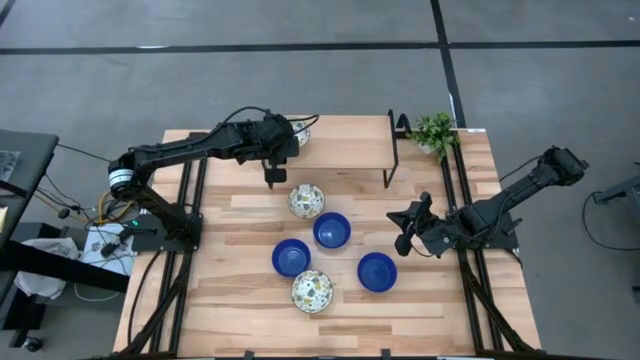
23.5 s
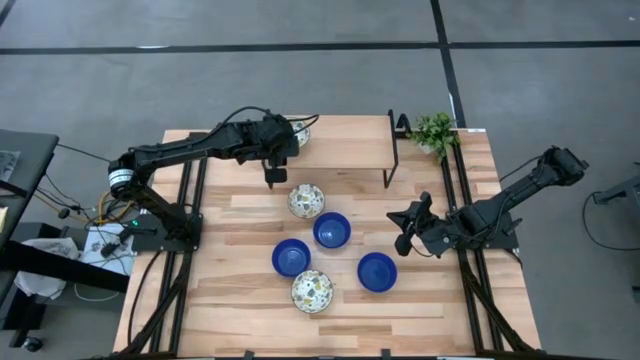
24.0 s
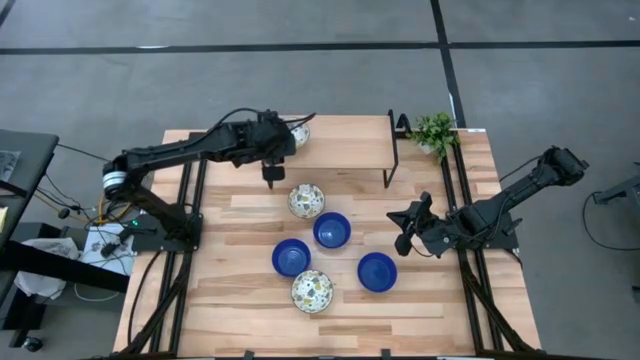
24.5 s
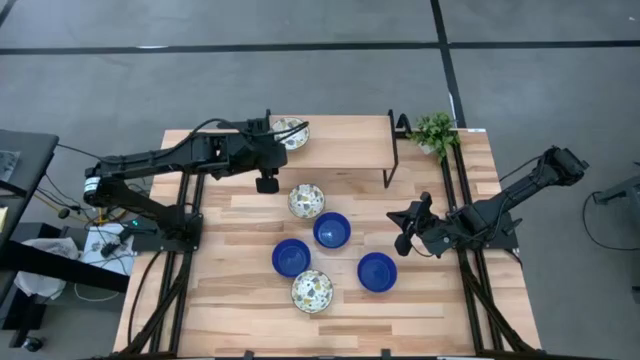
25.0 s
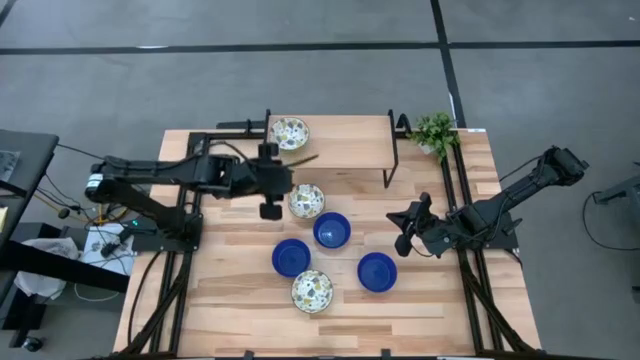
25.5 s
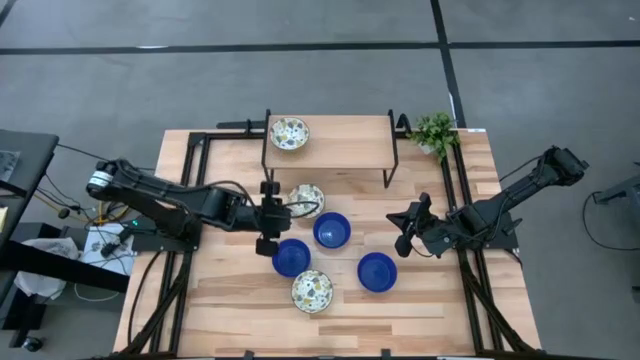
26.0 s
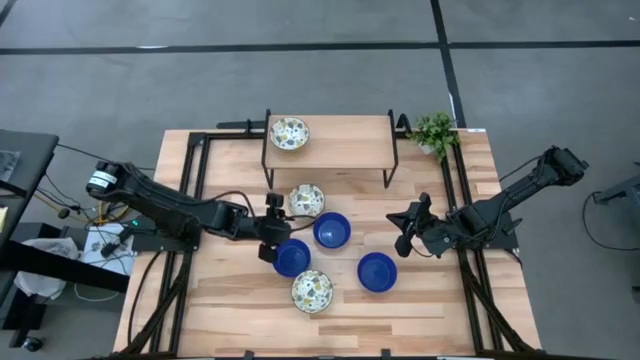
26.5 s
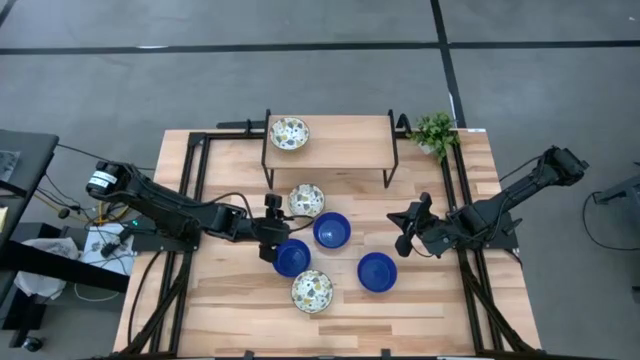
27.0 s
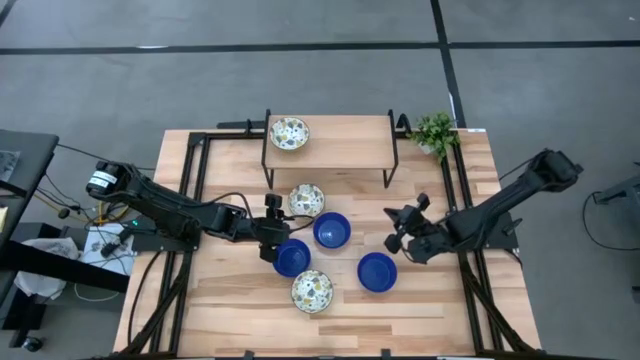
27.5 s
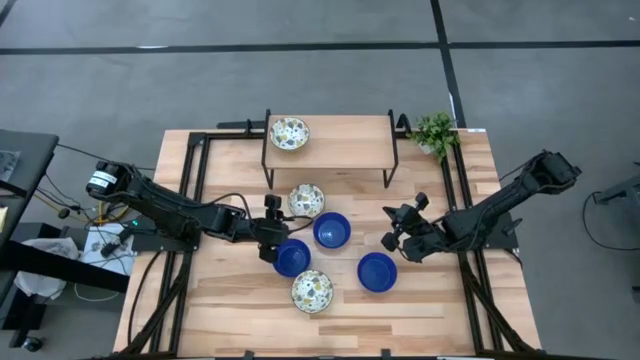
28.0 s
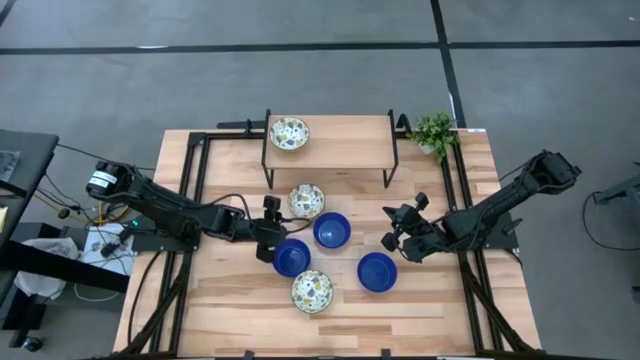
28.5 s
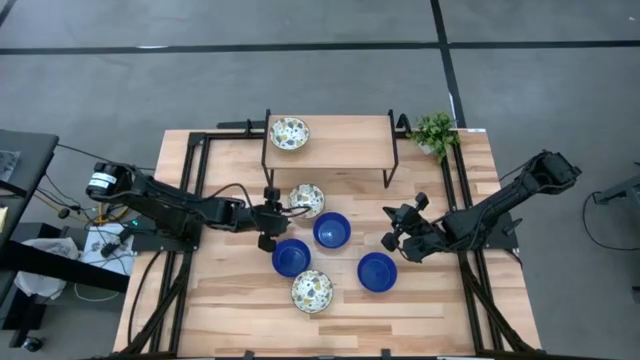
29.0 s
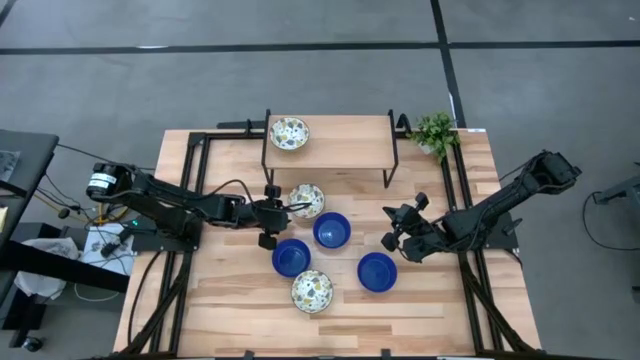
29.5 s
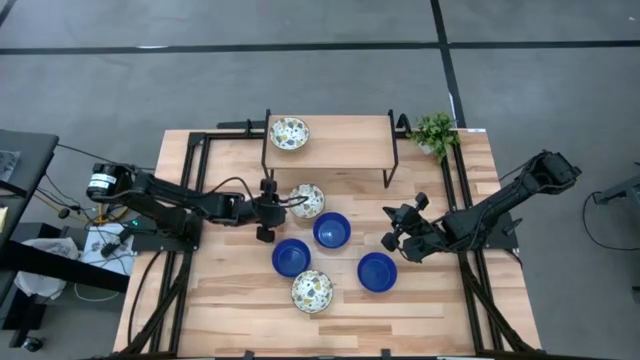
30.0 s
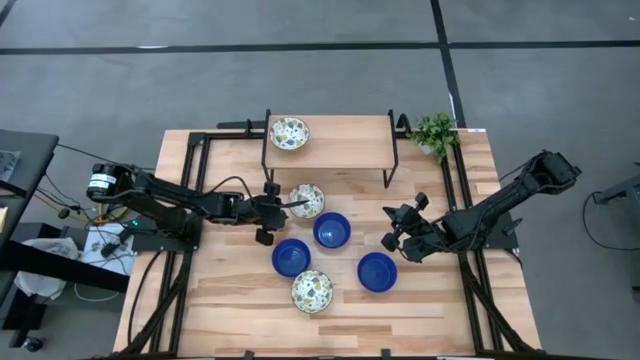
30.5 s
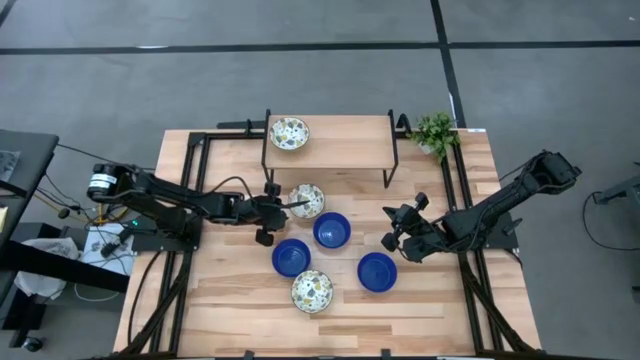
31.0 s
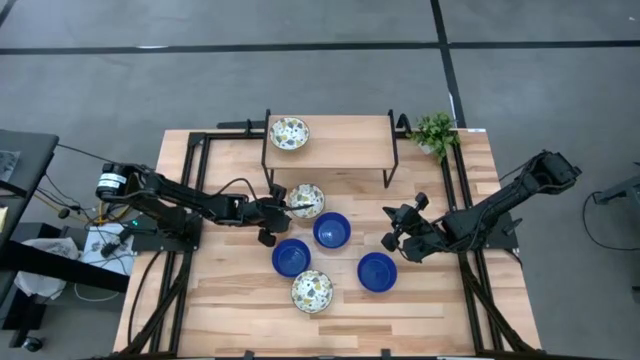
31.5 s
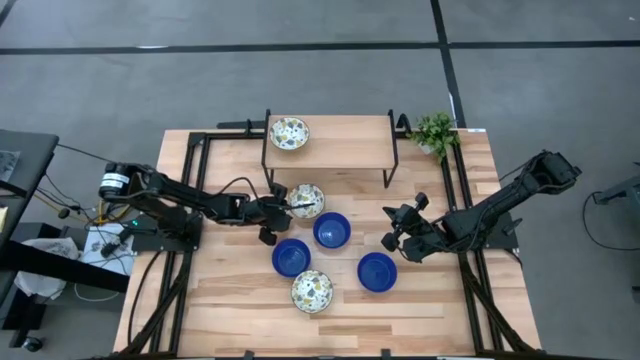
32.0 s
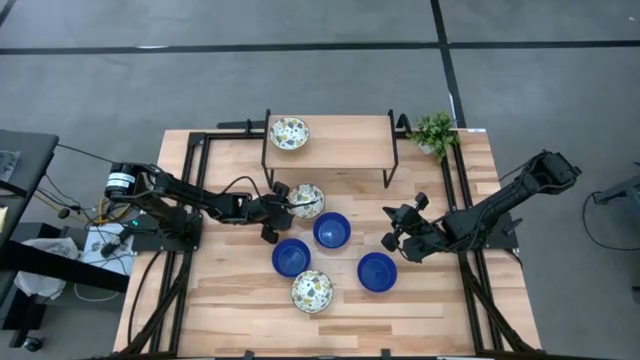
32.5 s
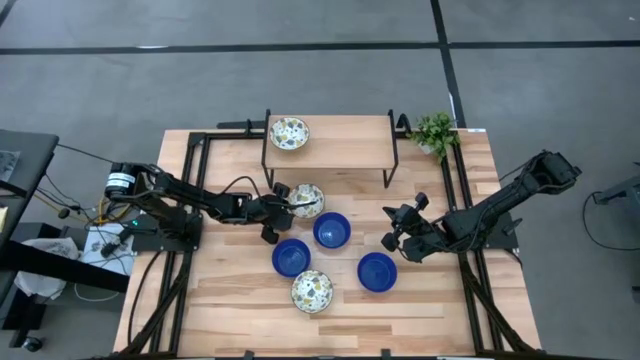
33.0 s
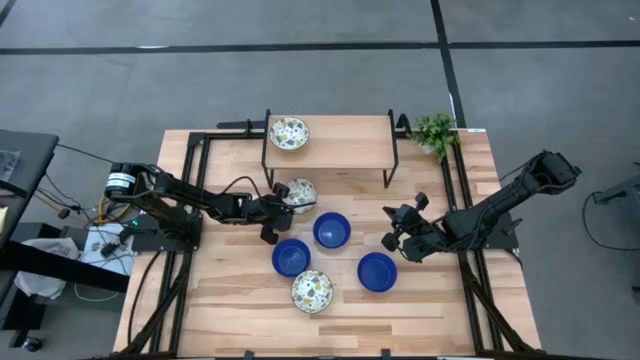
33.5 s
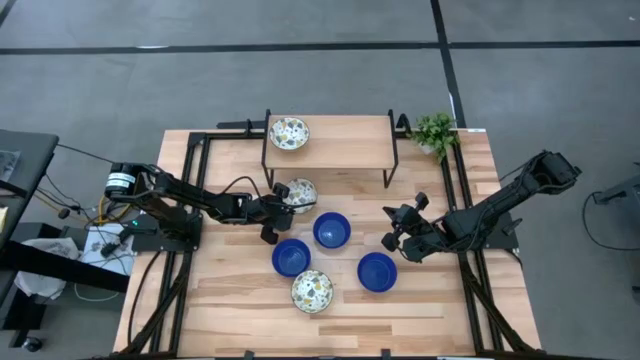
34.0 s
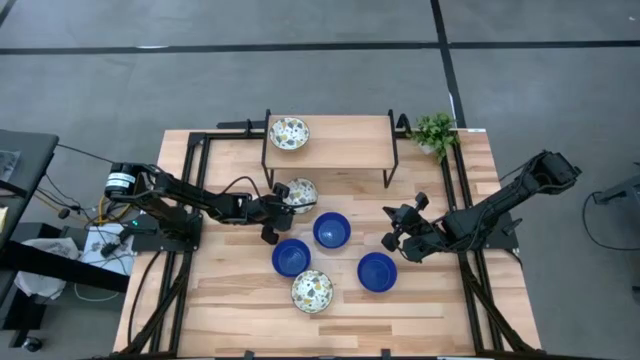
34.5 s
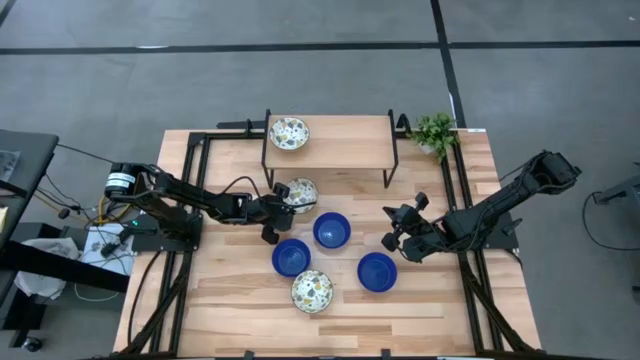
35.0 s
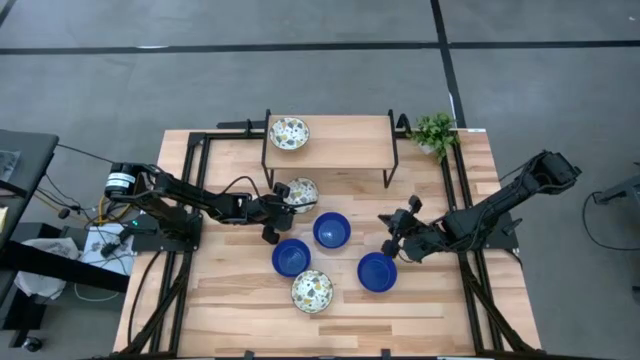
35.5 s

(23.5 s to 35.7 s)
Task: Pick & Place Mini bowls
Stack the white pattern bowl on the top of the white pattern bowl on the shelf

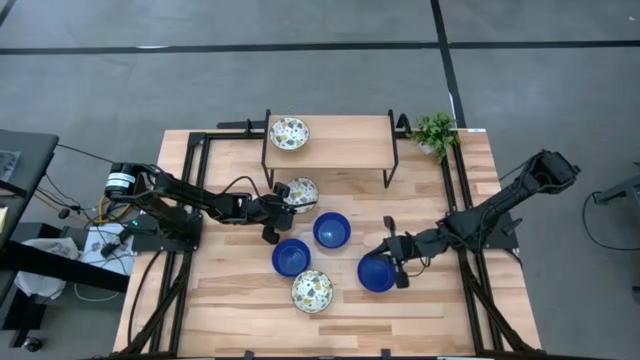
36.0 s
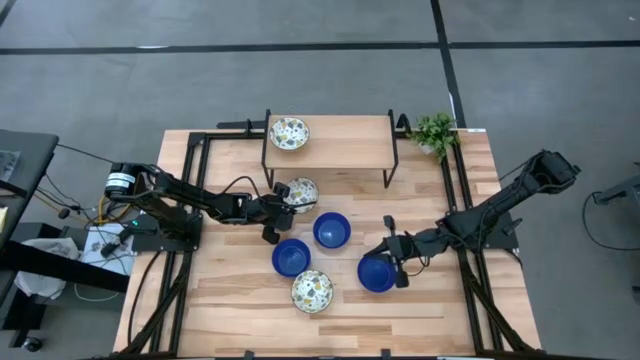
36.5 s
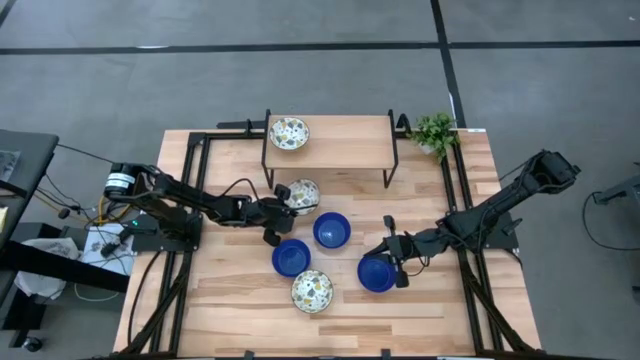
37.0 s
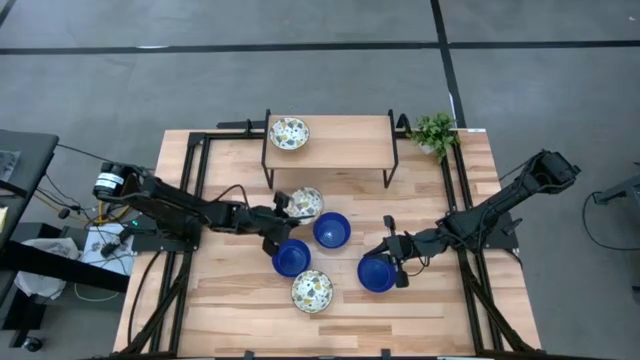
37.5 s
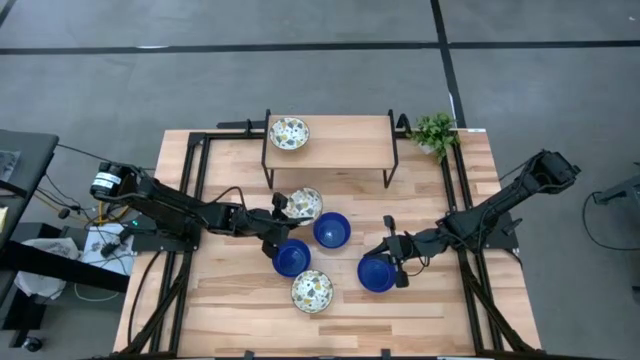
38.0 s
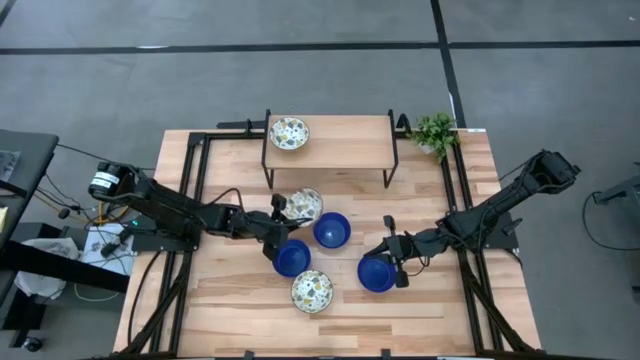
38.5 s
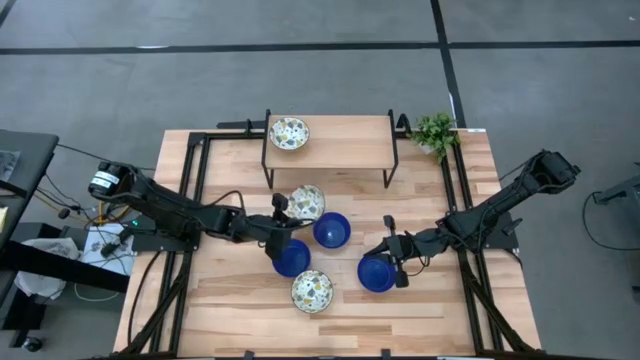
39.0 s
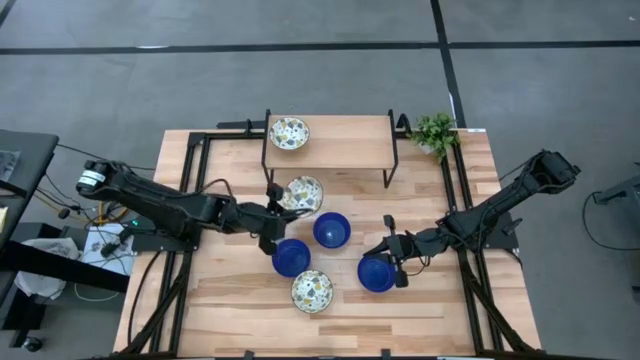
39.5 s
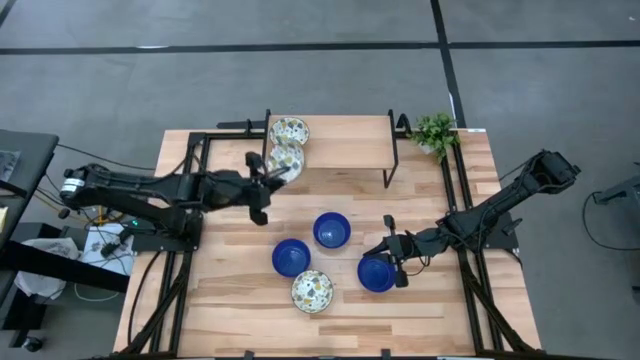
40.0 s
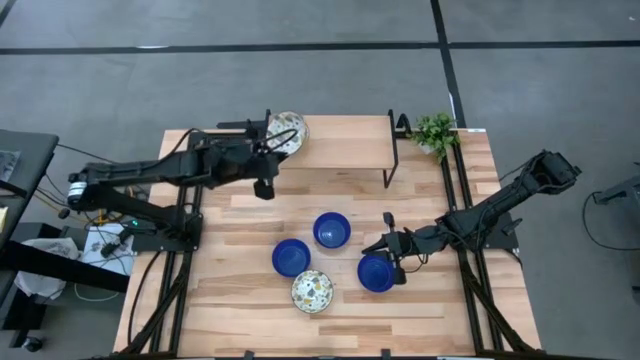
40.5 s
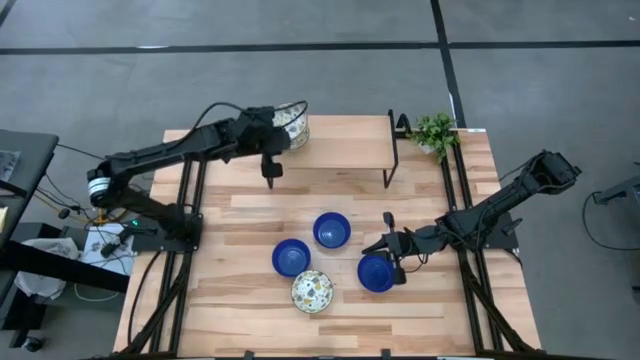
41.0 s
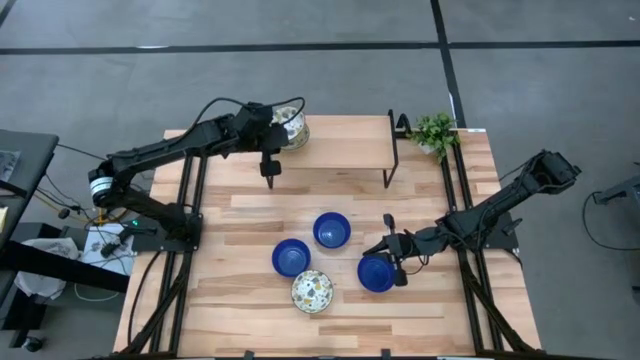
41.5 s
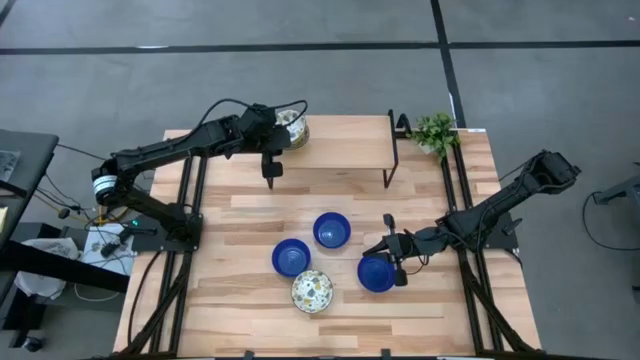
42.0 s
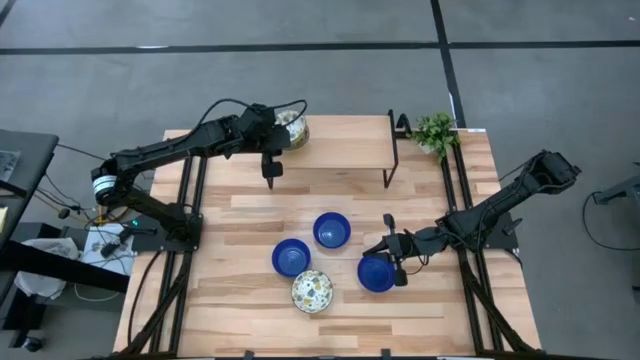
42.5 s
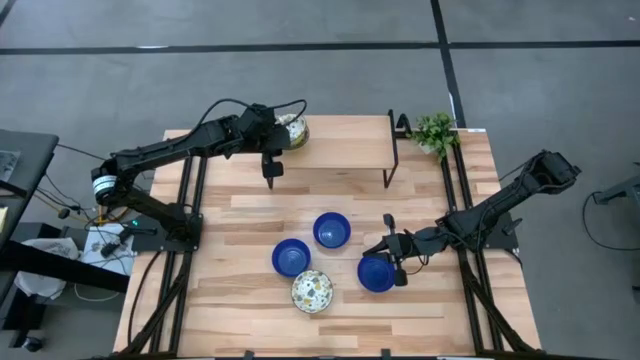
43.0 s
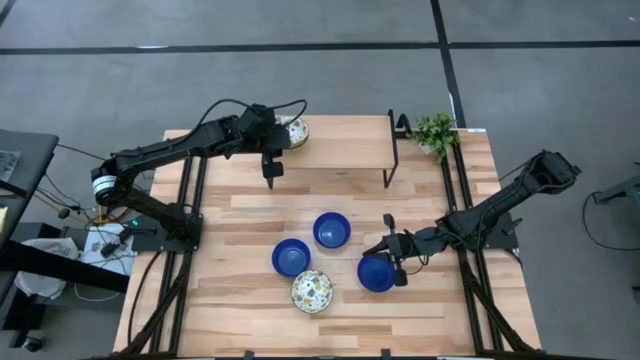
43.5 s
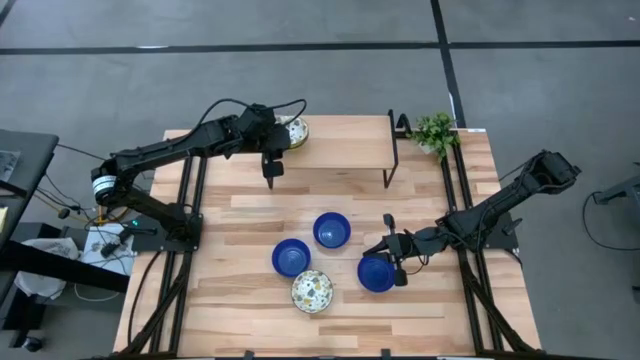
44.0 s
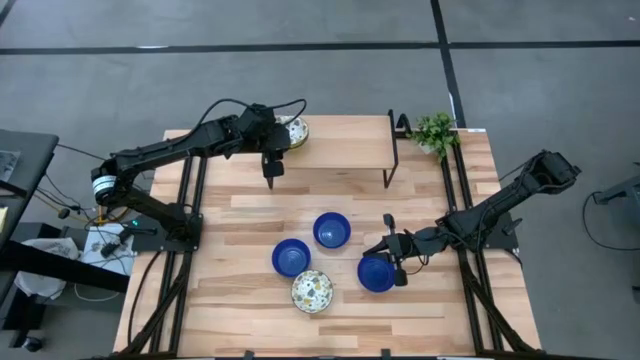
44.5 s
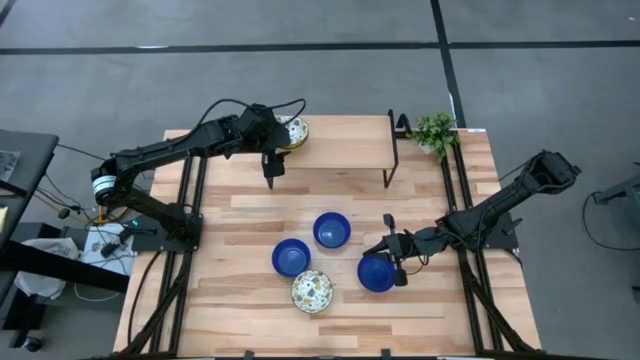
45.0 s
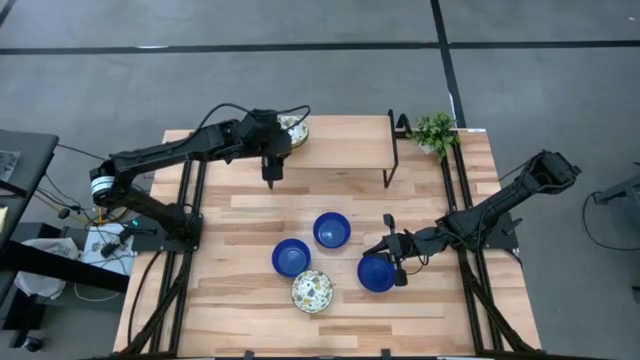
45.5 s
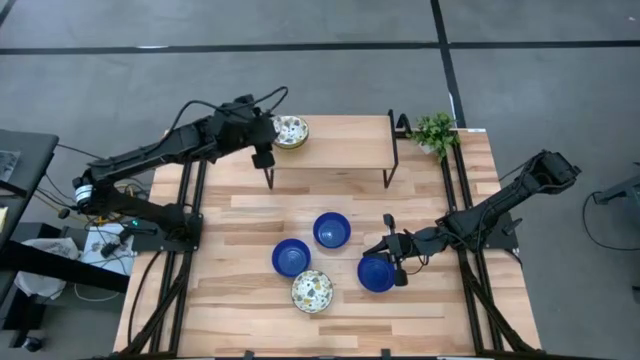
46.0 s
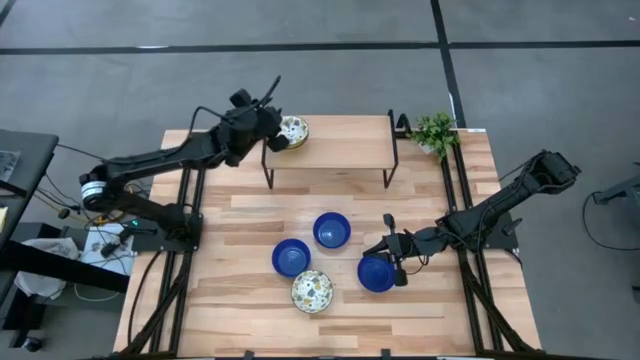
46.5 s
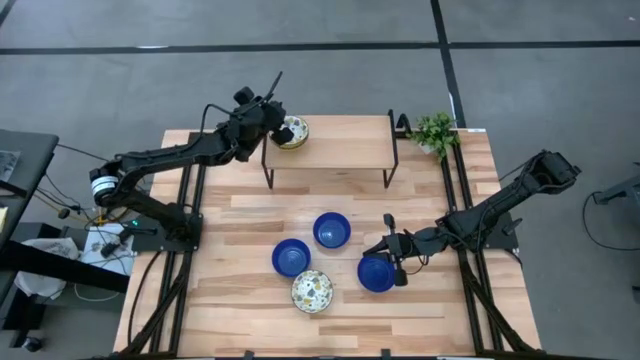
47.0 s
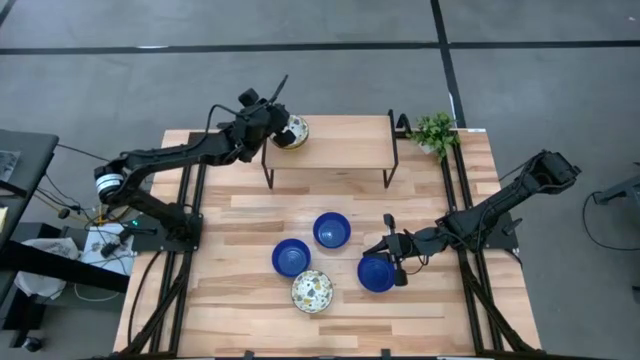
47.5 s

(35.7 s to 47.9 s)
Stack the white pattern bowl on the top of the white pattern bowl on the shelf
